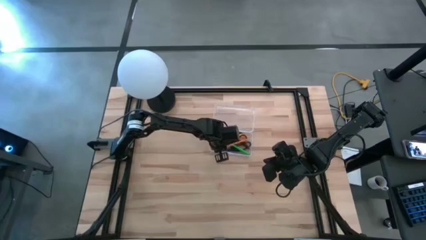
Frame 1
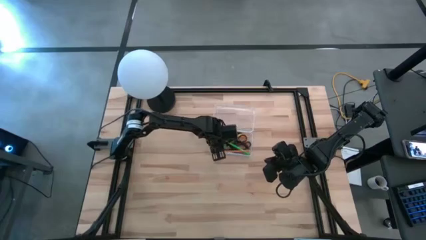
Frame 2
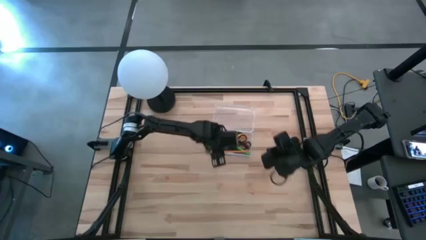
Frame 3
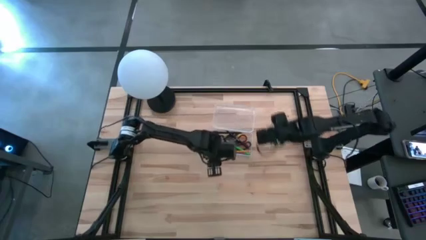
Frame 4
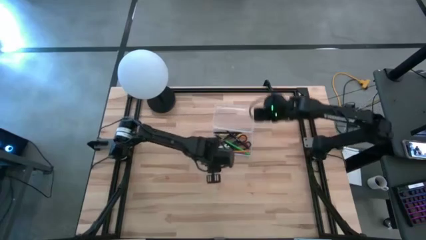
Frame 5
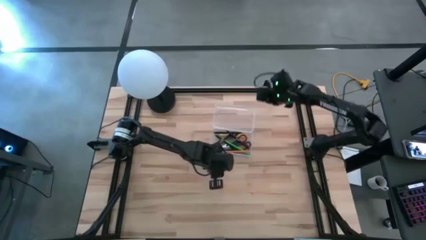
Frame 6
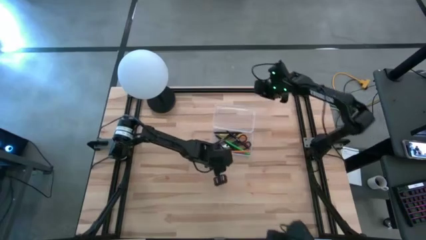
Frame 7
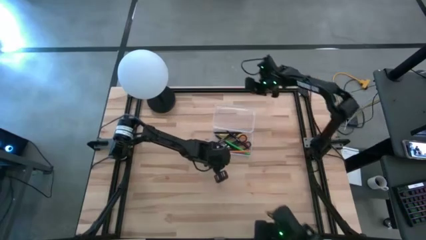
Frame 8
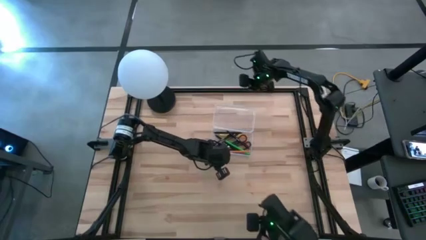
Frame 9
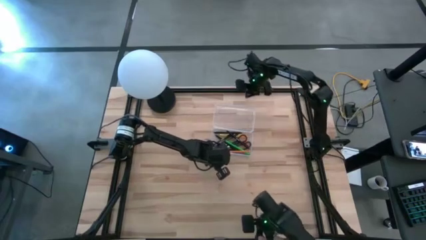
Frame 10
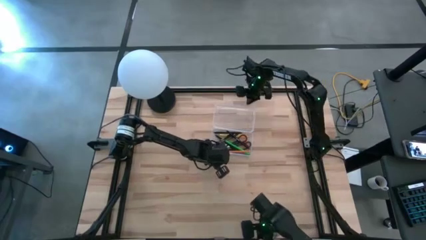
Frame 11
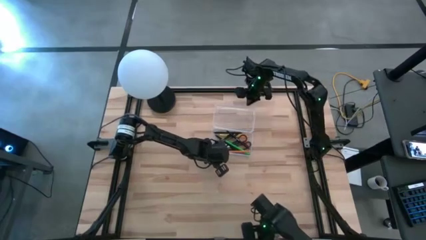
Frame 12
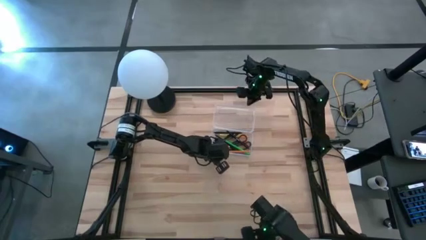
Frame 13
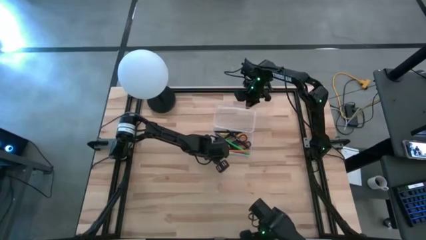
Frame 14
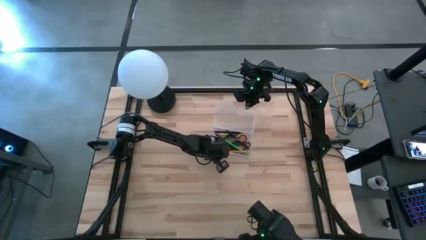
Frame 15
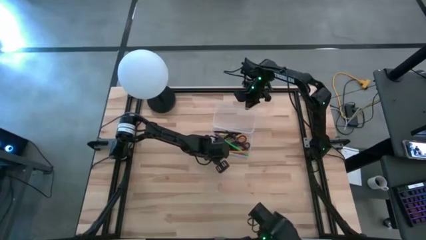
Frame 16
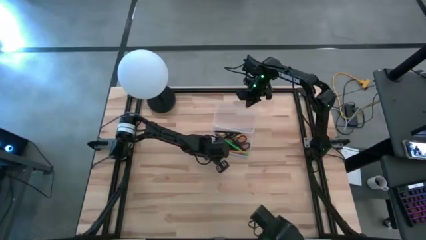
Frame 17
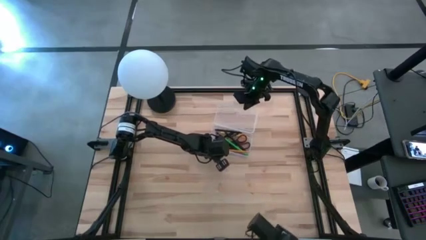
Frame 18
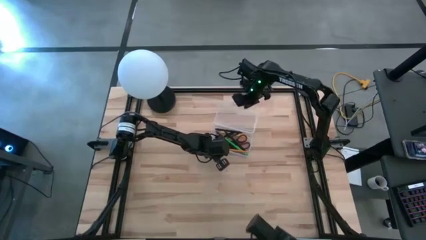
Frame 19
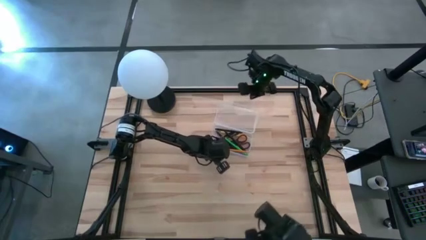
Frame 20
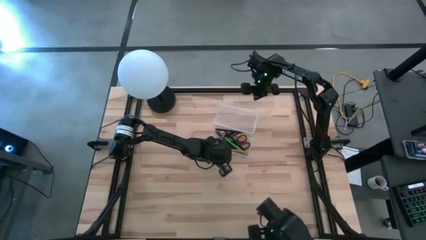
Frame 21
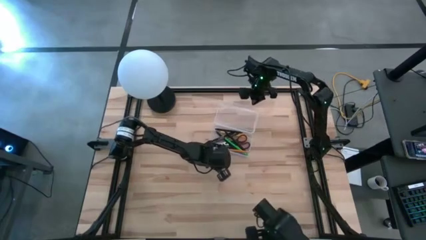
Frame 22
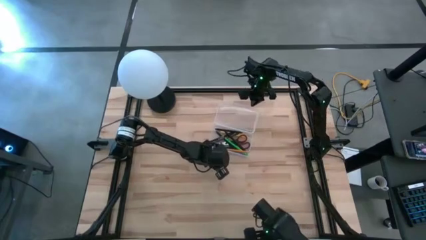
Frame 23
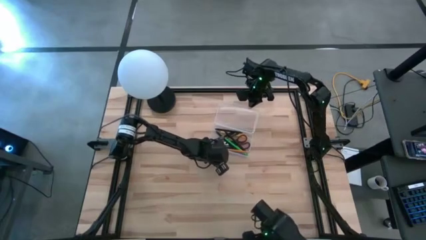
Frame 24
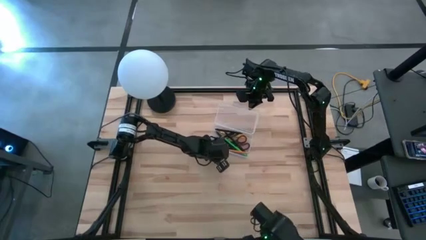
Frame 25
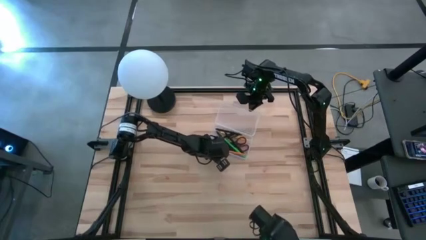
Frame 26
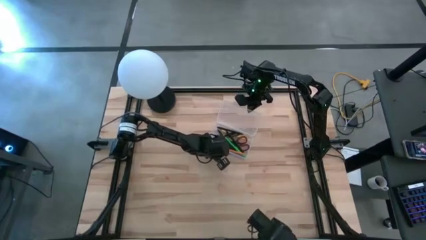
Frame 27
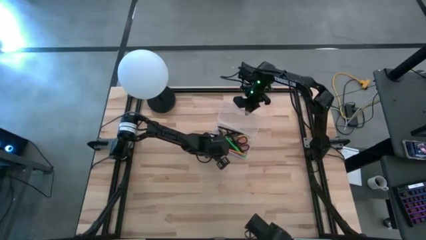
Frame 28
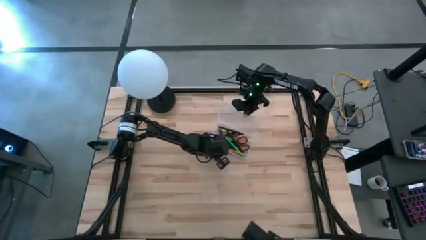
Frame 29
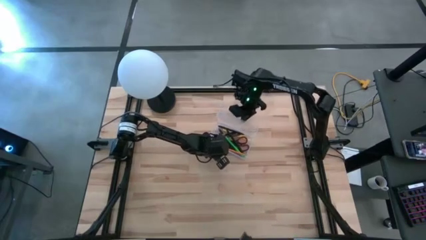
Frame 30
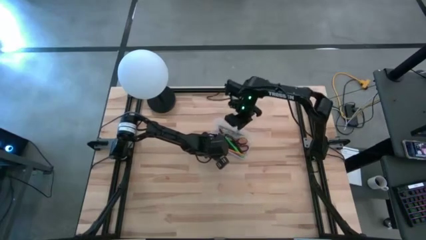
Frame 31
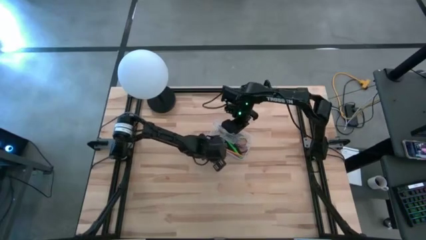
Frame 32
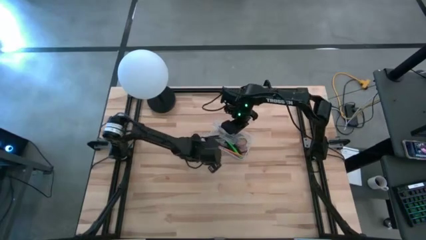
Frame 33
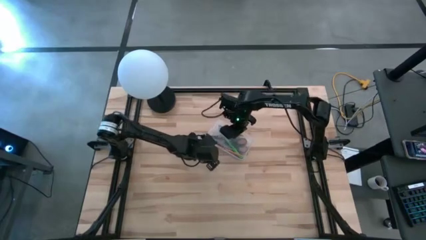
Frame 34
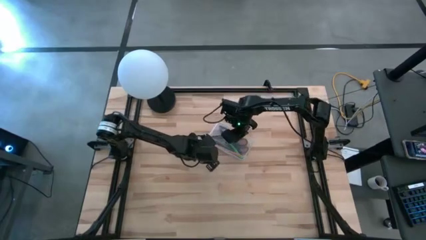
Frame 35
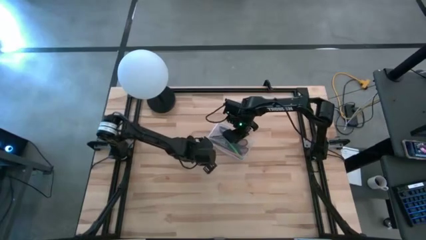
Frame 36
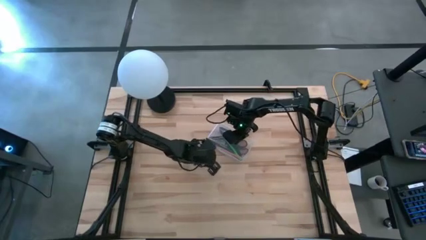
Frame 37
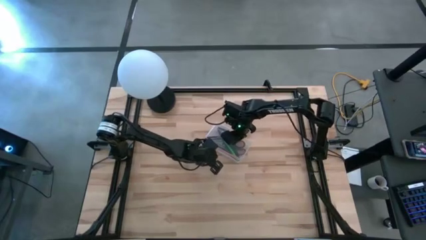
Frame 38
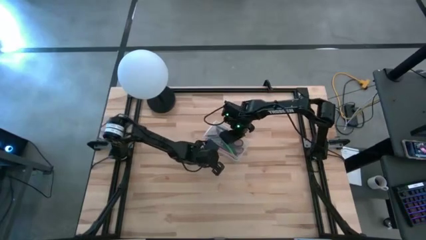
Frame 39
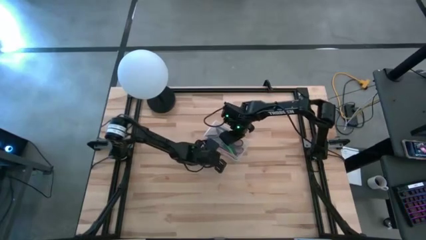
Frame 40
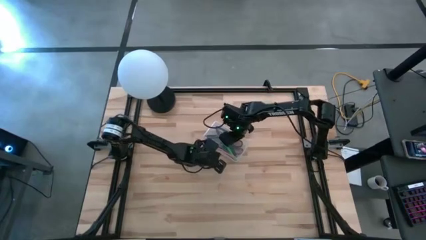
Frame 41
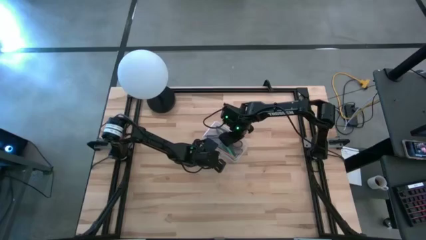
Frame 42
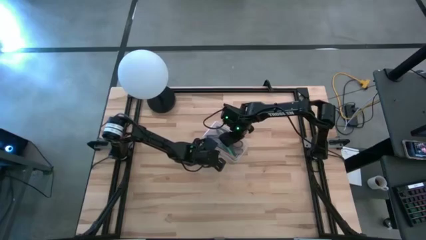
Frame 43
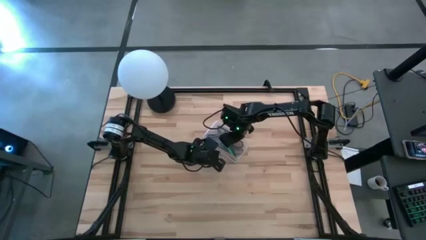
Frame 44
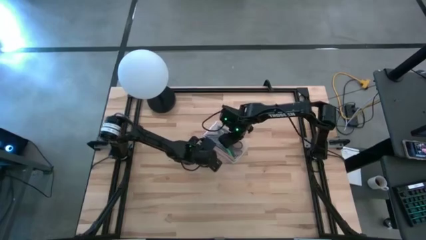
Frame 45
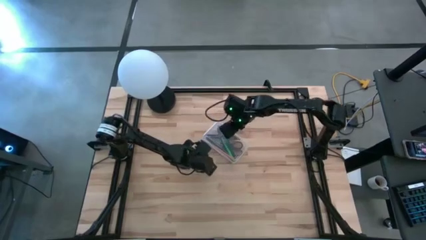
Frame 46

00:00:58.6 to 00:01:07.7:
Task: Pick & place school supplies into a supply box
Close the supply box

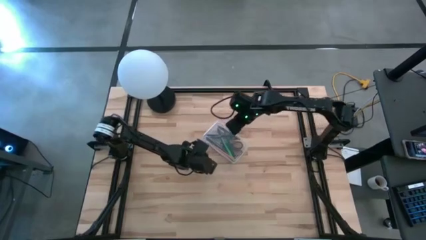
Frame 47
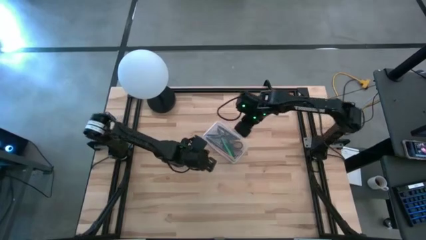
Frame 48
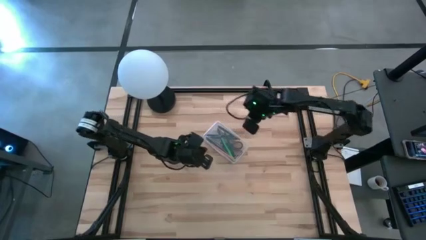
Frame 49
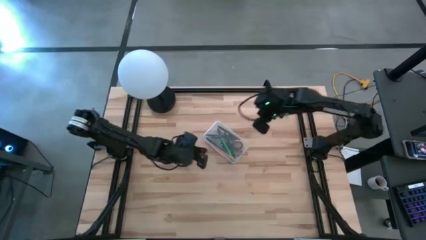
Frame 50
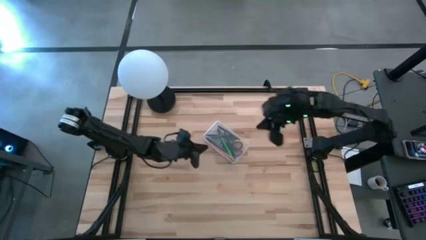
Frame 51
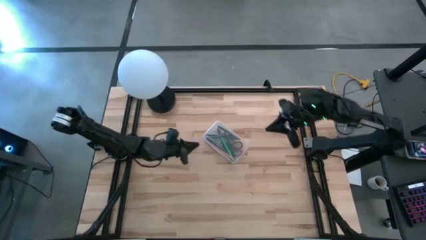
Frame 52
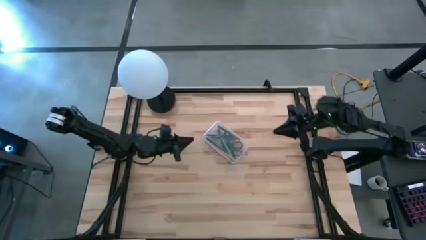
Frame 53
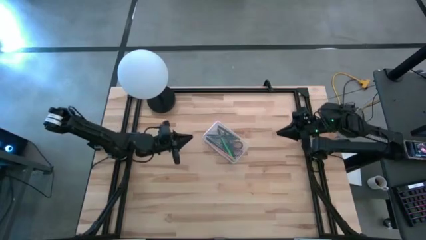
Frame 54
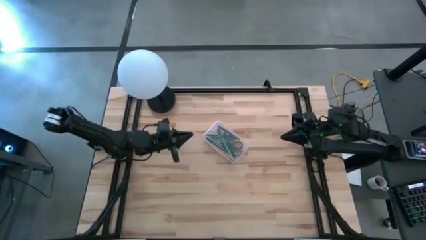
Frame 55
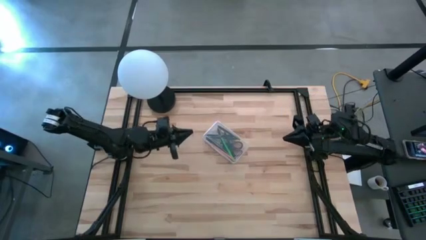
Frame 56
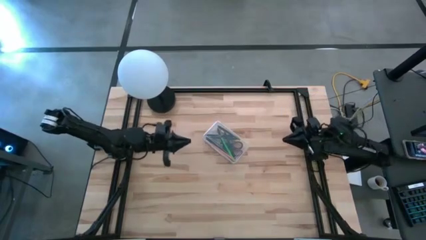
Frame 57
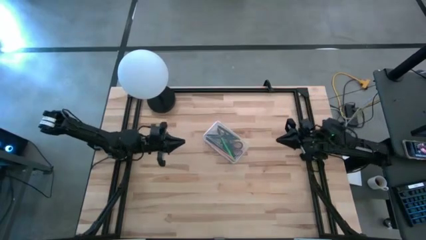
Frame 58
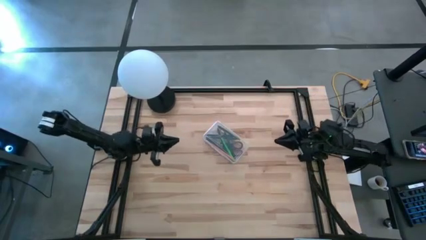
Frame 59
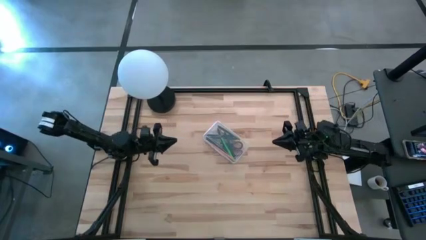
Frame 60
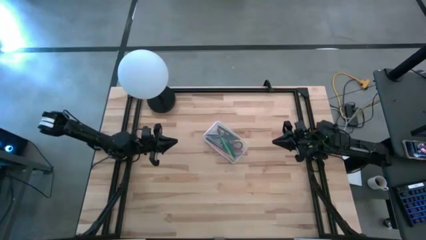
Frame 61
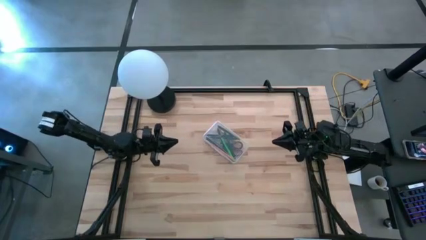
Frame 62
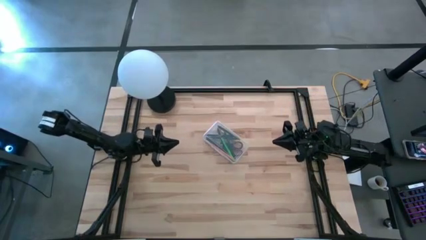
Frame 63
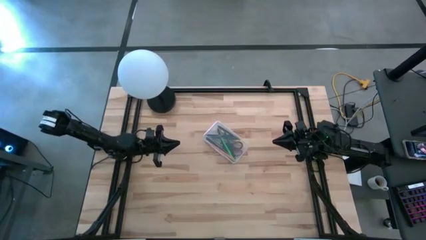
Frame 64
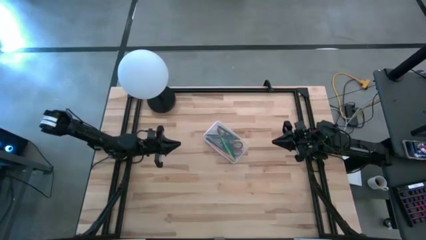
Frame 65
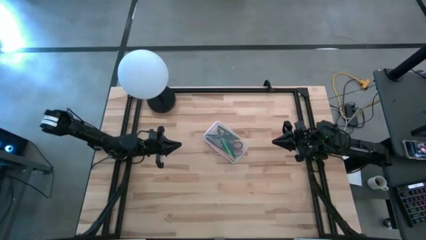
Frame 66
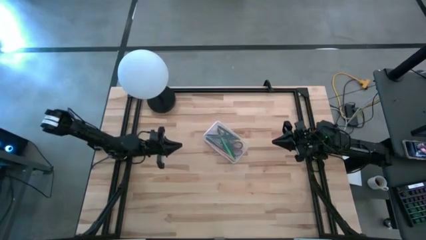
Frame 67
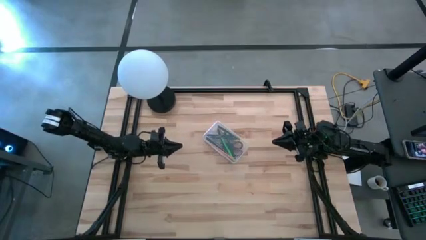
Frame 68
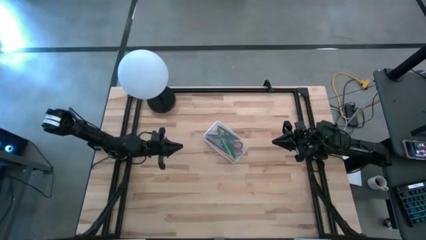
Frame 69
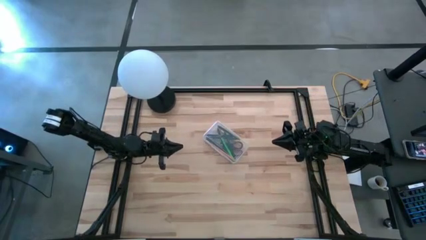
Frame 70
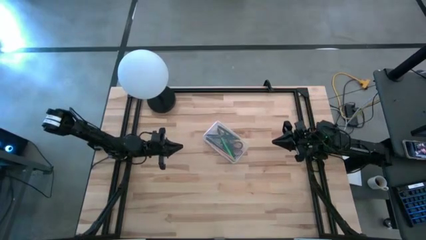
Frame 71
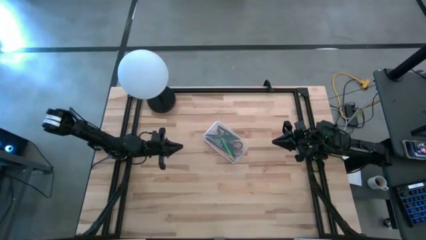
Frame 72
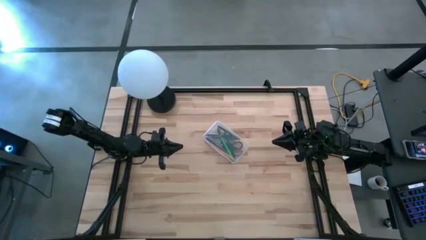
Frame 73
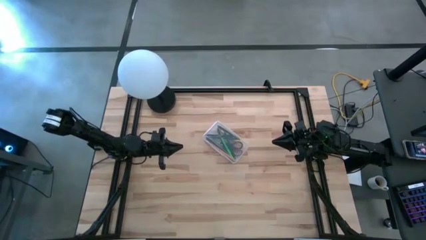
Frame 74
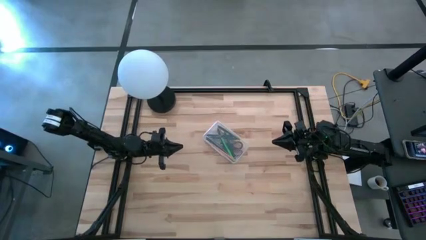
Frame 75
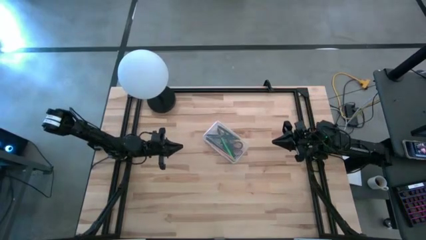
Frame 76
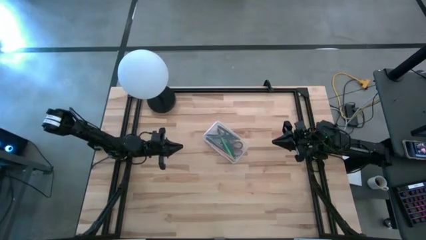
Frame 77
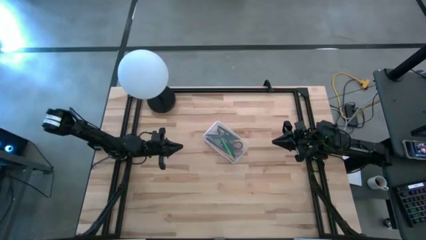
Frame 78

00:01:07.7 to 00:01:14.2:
Return to Home Position
